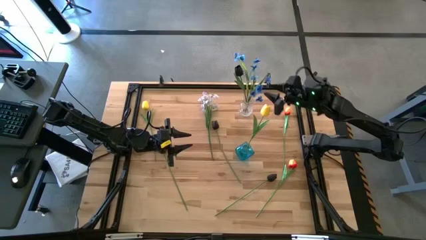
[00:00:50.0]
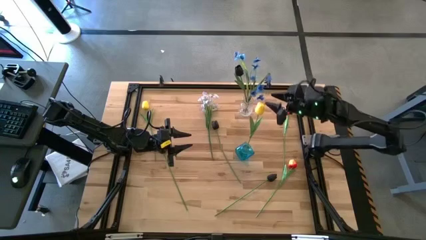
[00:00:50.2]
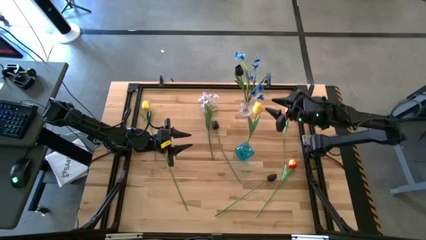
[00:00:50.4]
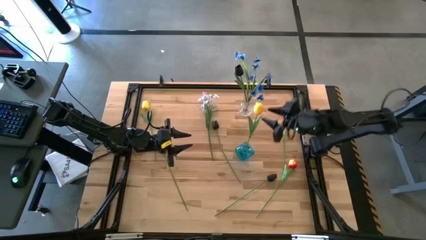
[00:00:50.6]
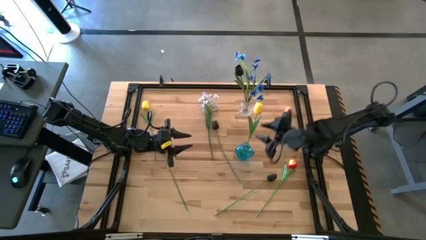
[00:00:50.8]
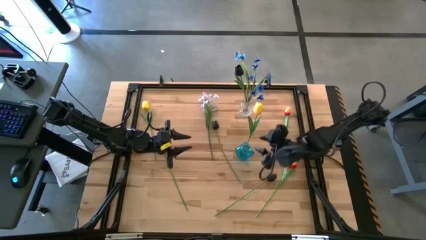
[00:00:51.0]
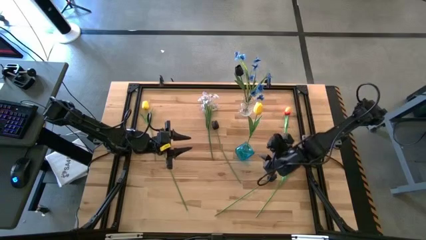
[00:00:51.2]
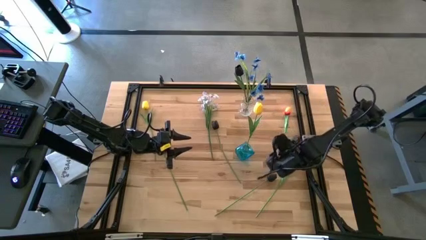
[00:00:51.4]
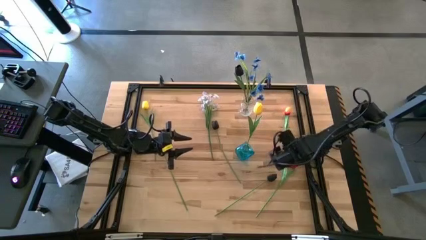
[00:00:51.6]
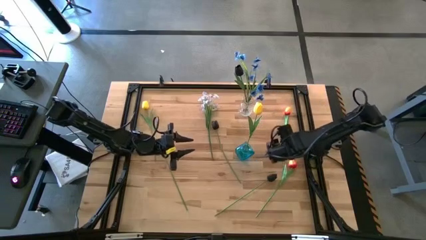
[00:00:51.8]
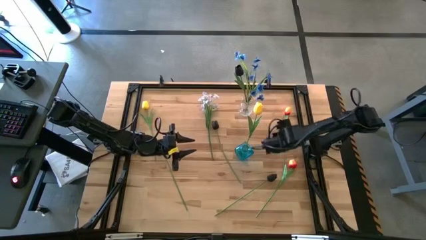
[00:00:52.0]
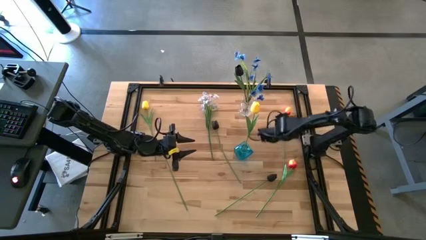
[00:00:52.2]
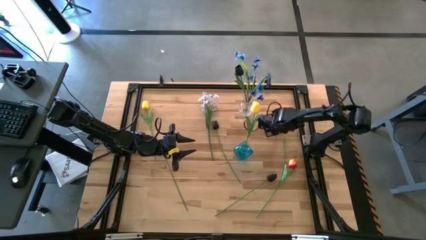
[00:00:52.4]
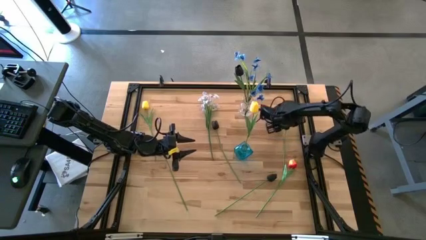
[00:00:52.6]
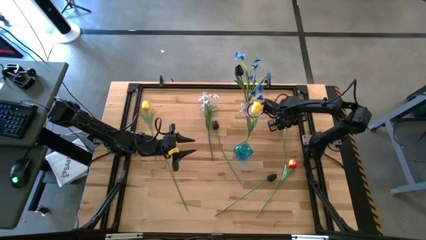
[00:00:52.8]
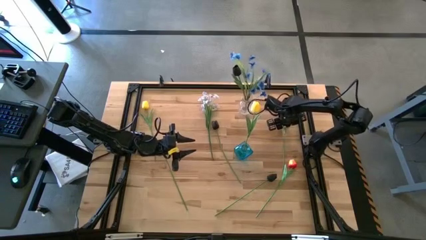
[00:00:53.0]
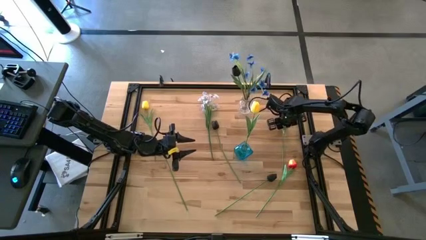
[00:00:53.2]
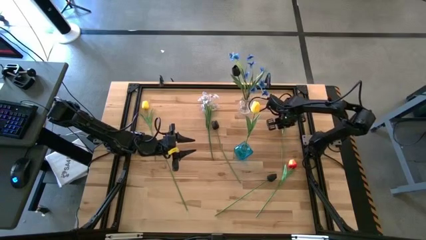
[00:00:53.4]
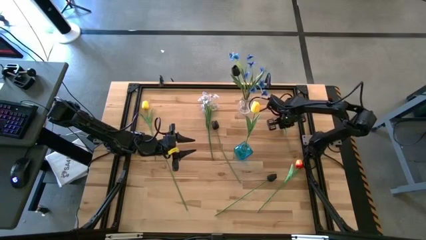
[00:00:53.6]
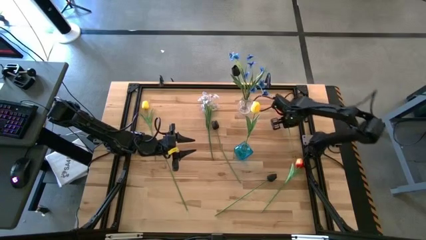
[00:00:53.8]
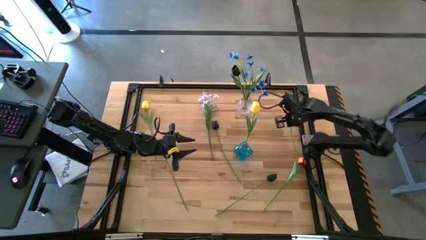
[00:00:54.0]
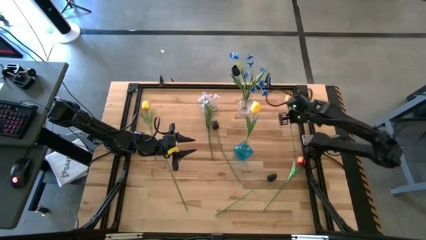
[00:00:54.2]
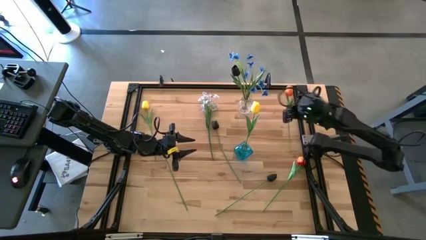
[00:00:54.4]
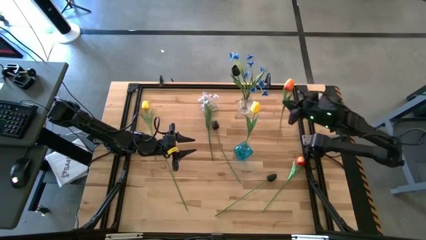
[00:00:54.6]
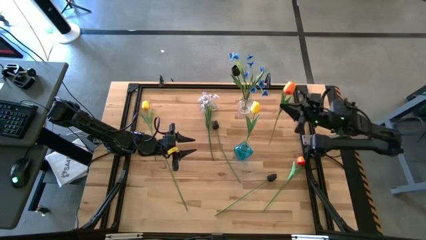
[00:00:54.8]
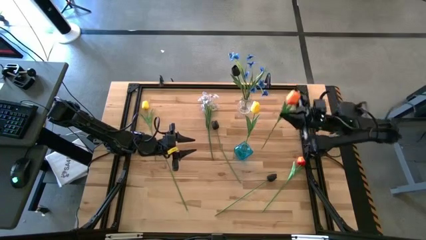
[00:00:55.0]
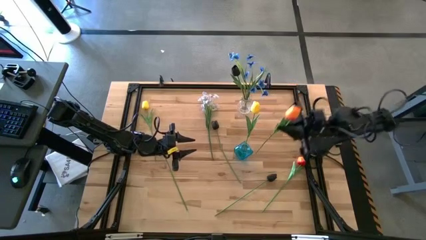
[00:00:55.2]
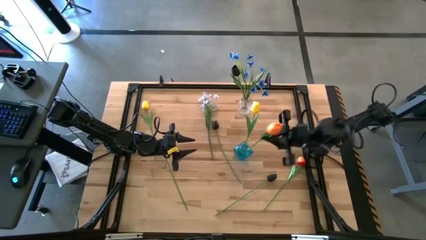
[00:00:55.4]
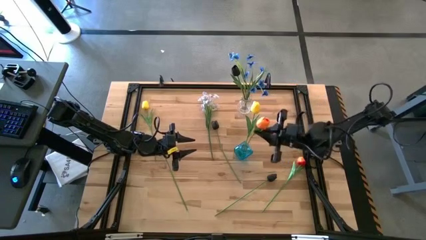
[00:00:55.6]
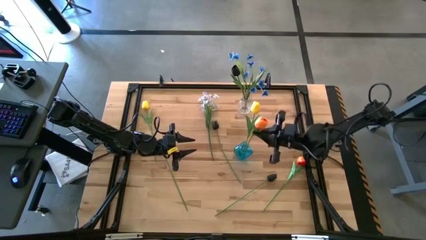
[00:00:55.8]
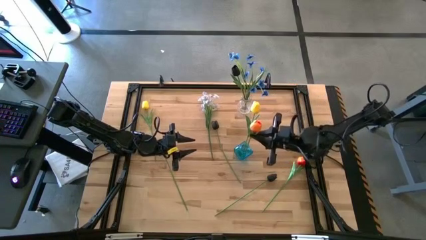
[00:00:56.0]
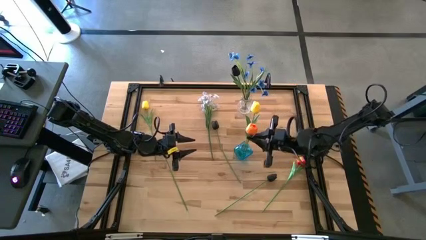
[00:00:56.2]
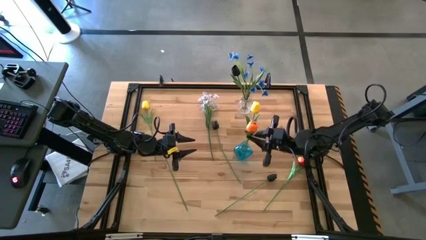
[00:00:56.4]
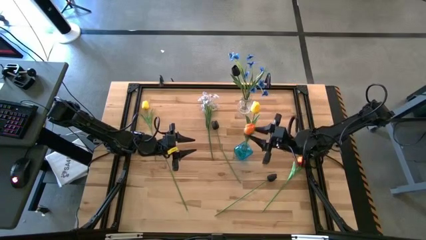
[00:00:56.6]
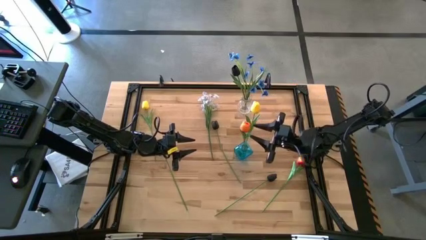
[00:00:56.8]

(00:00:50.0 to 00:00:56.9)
Task: Sort flowers into vase by color
Put the orange tulip into the blue flower vase

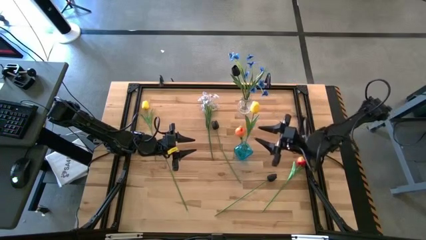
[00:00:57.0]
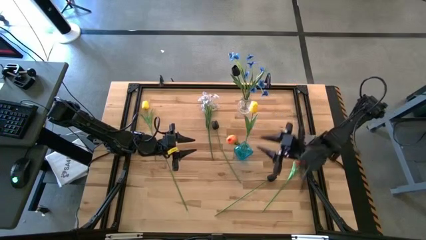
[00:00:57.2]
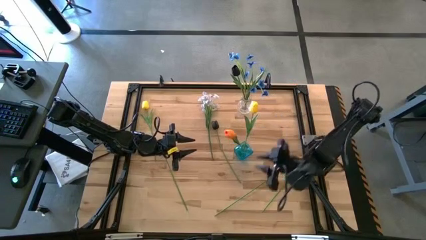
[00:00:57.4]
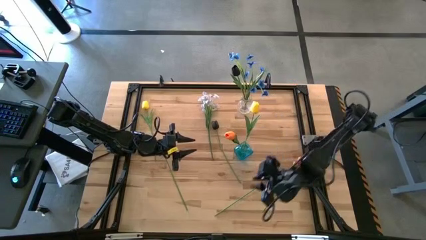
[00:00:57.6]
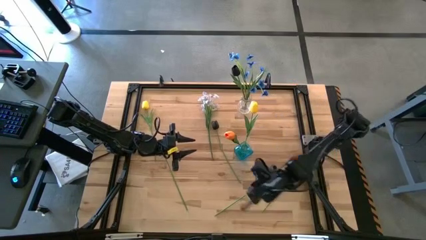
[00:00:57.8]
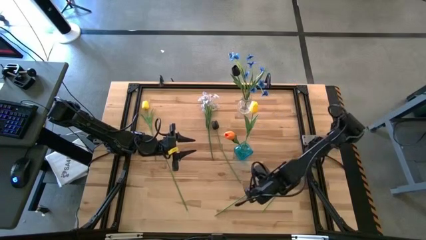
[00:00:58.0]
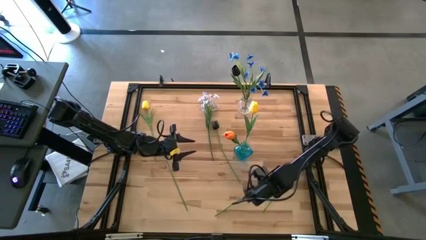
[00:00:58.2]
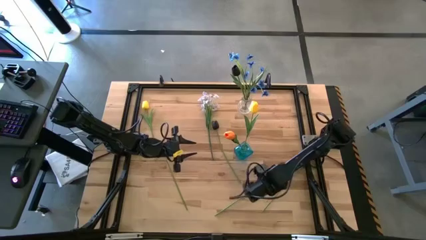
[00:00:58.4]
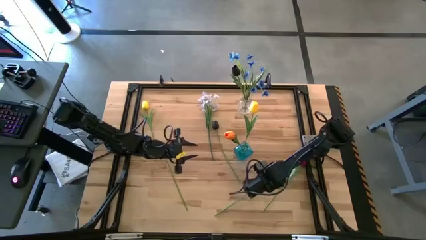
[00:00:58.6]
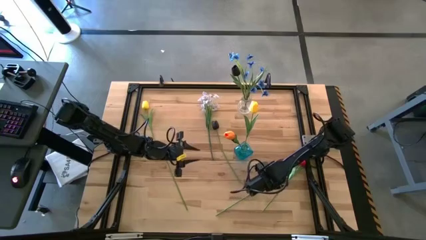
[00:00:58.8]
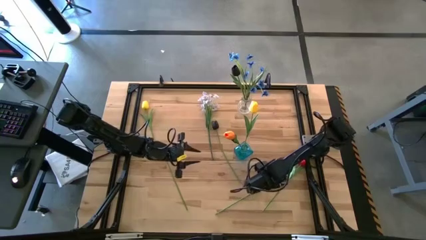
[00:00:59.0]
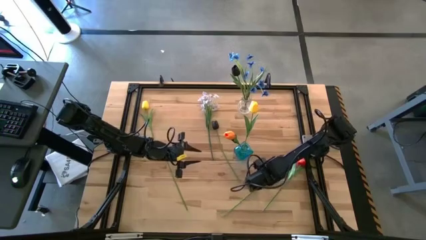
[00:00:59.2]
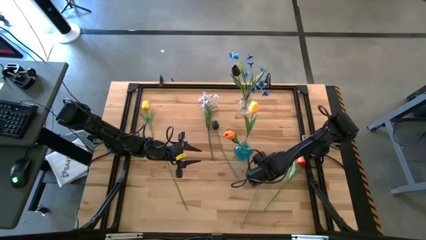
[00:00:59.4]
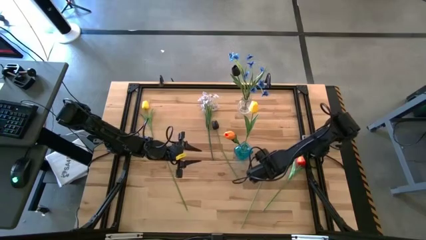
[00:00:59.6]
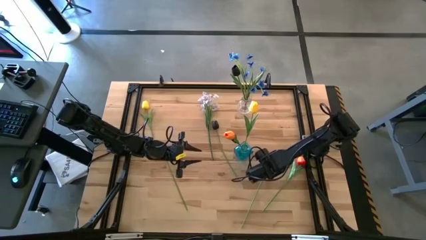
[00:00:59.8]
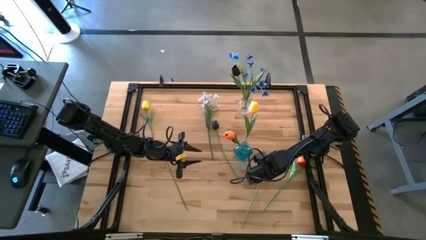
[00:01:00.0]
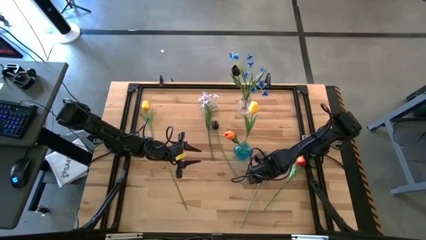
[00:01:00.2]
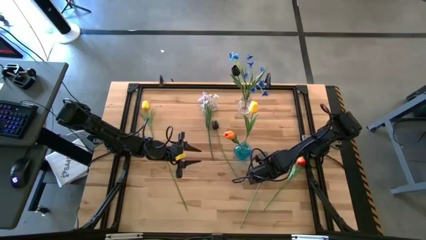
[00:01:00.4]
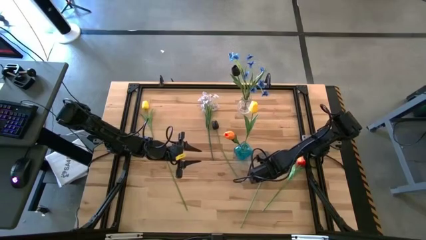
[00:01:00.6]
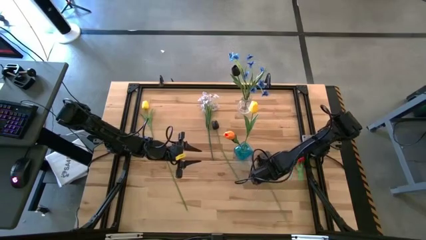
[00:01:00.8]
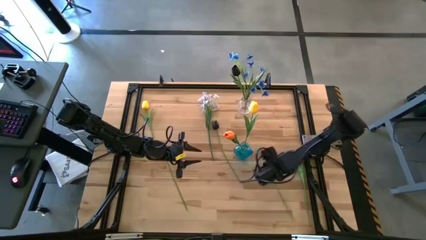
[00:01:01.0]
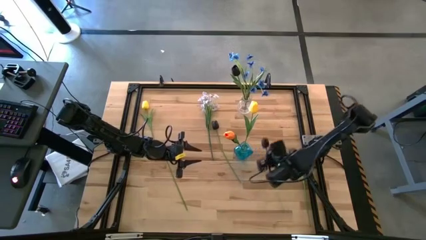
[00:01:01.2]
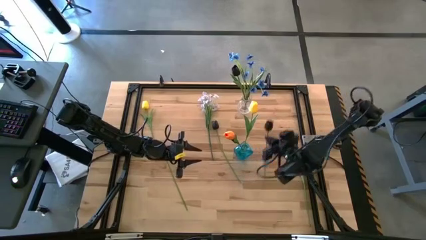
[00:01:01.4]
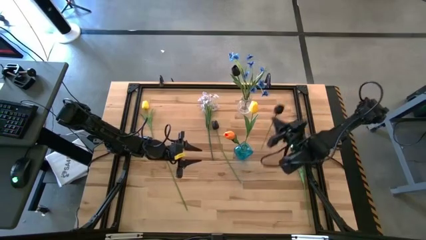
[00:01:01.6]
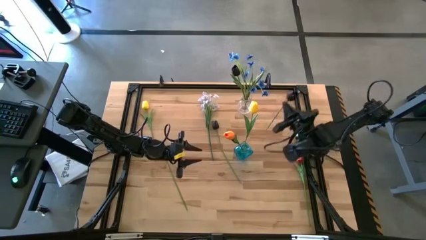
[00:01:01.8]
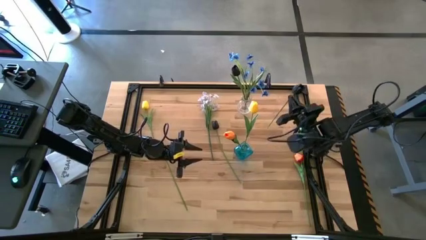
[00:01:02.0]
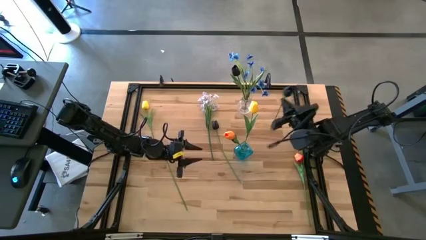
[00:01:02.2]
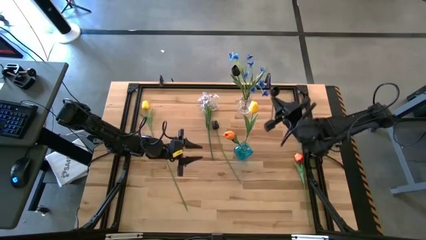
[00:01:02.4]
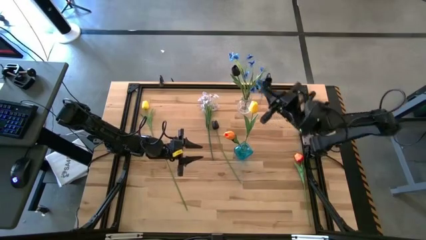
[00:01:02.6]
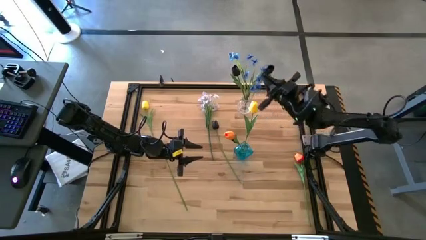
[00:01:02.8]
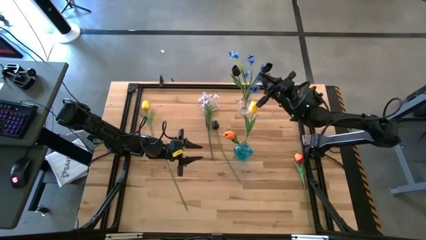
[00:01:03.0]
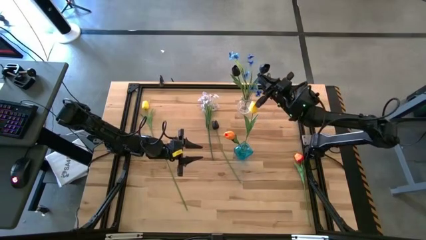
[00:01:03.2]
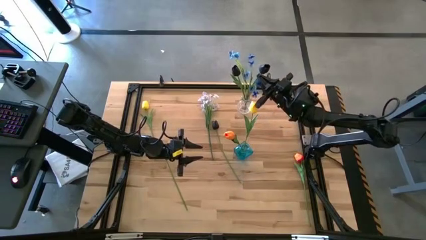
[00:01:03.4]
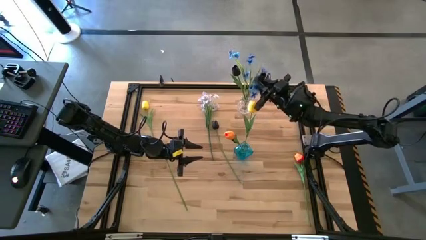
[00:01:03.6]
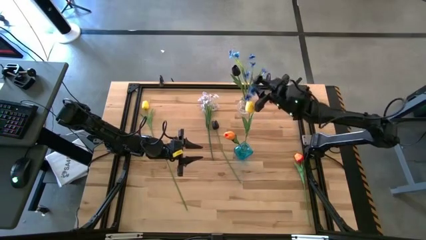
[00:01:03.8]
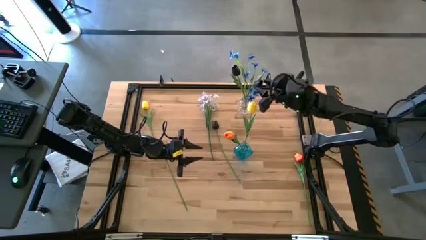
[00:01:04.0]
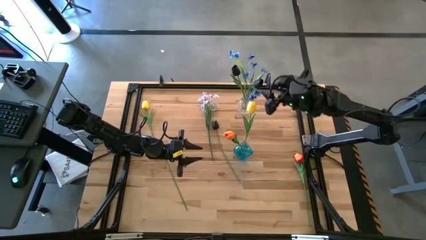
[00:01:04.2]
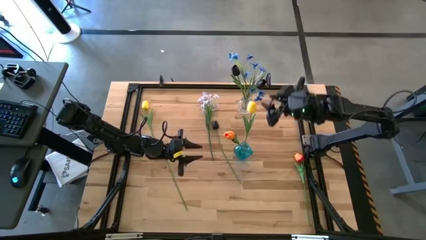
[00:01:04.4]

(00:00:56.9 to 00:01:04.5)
Put the black tulip into the transparent flower vase
